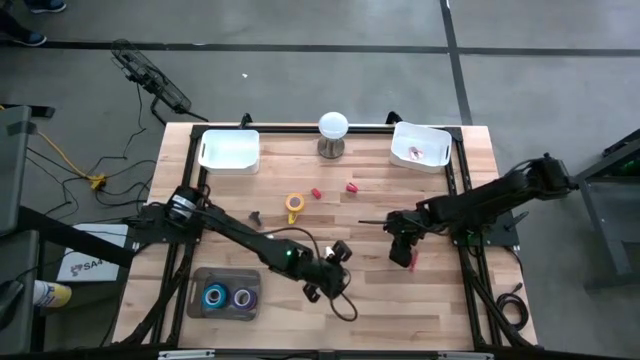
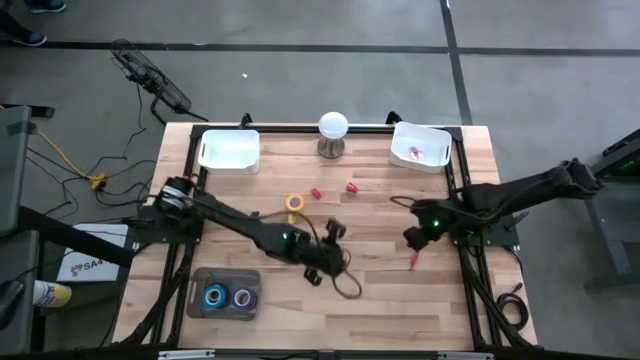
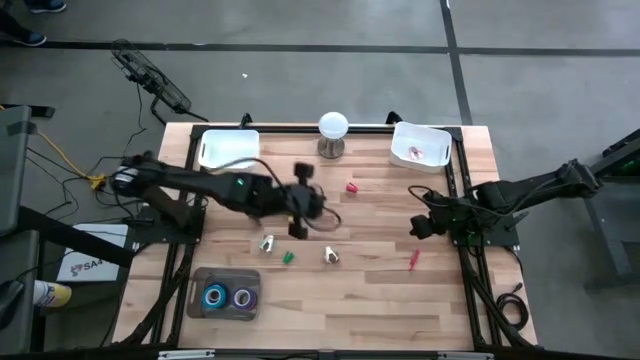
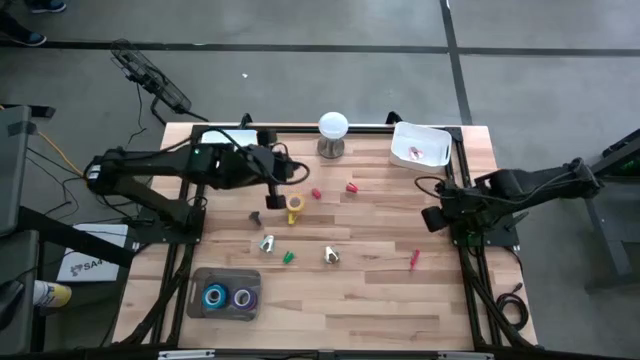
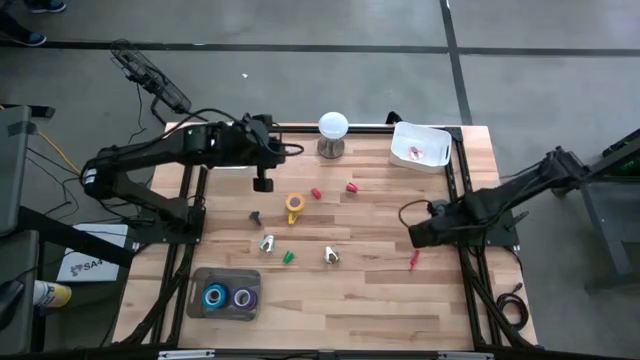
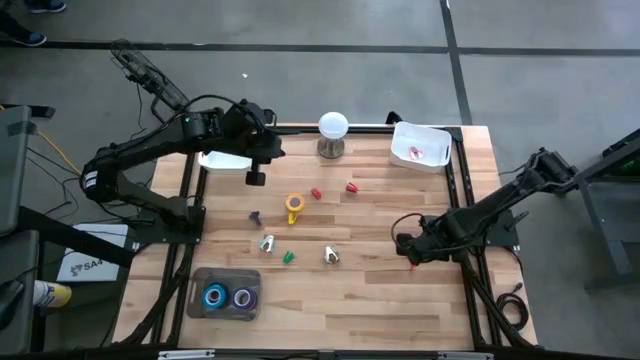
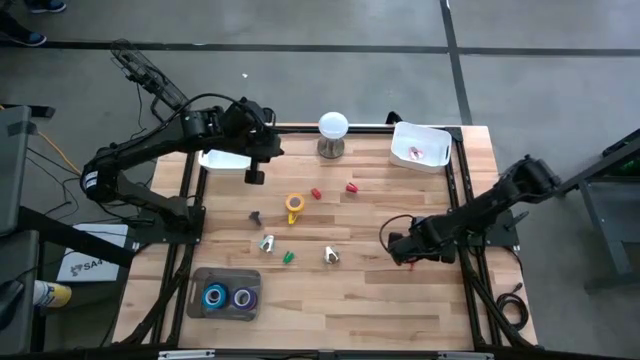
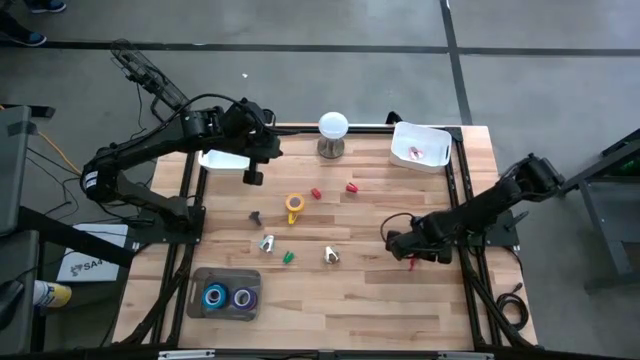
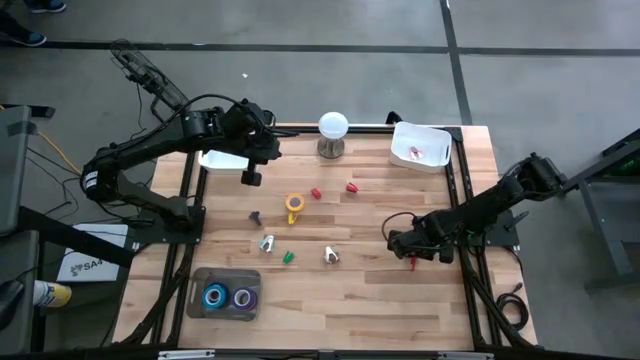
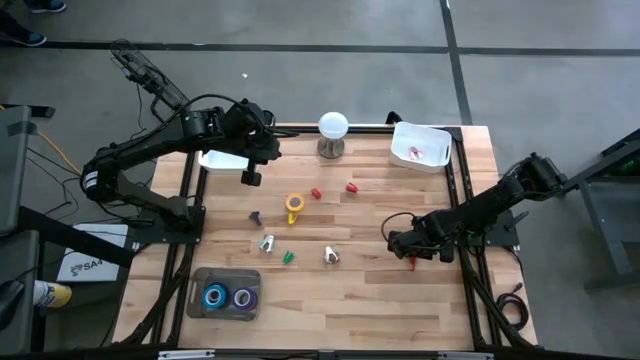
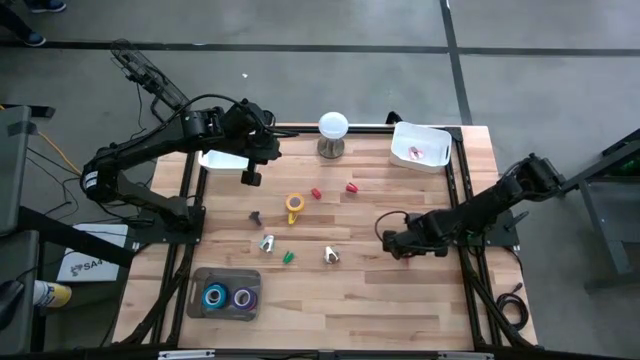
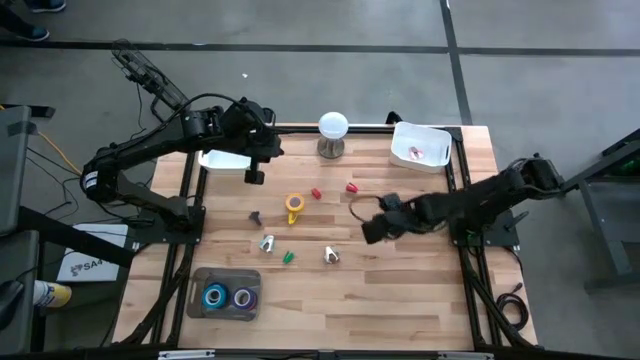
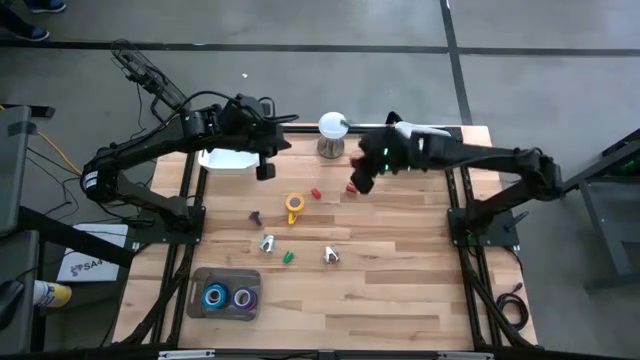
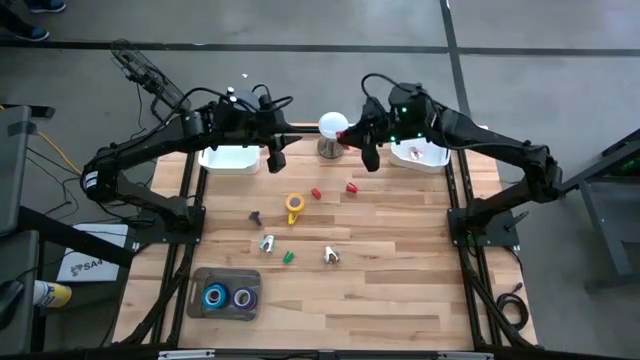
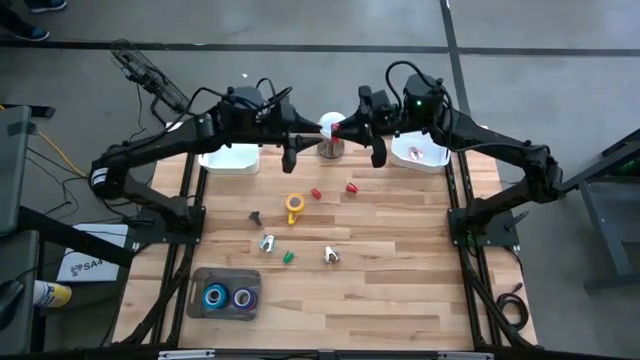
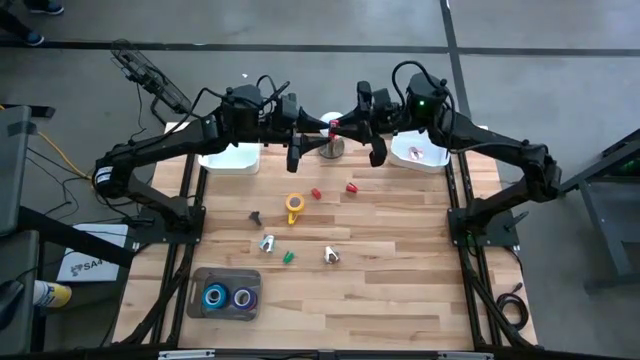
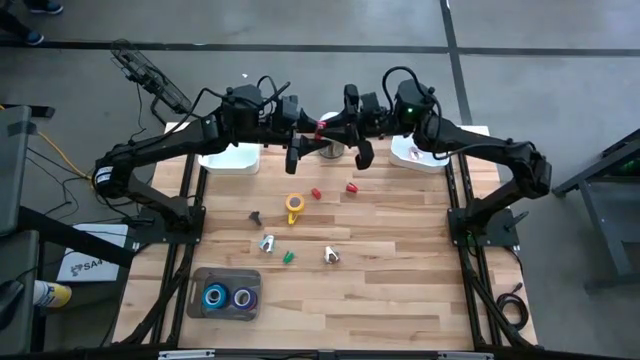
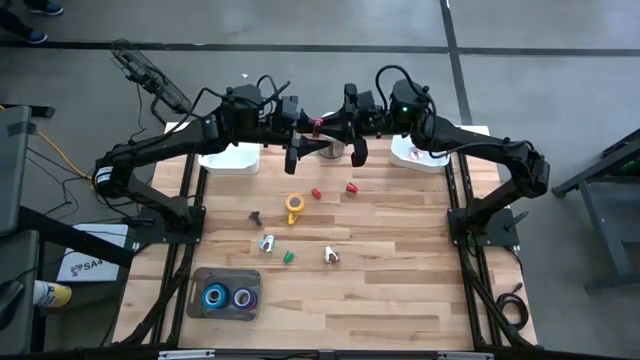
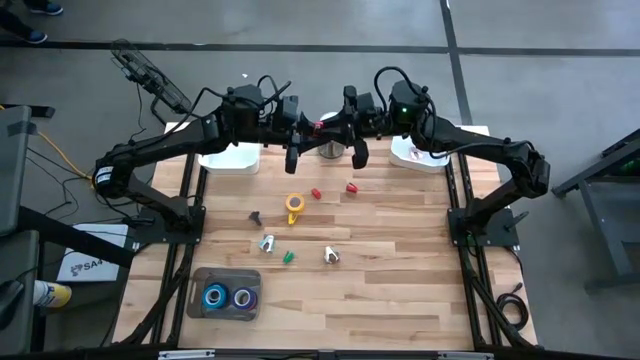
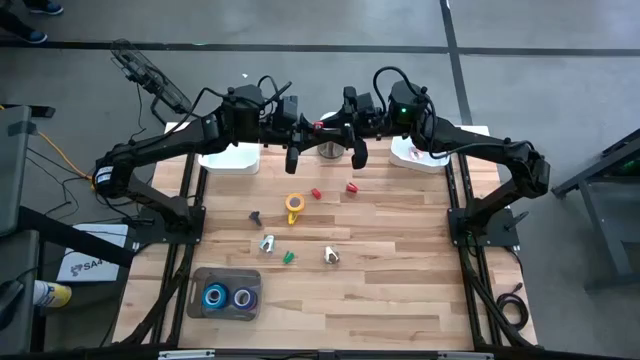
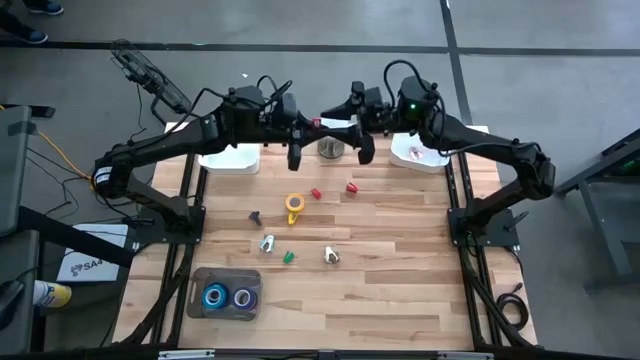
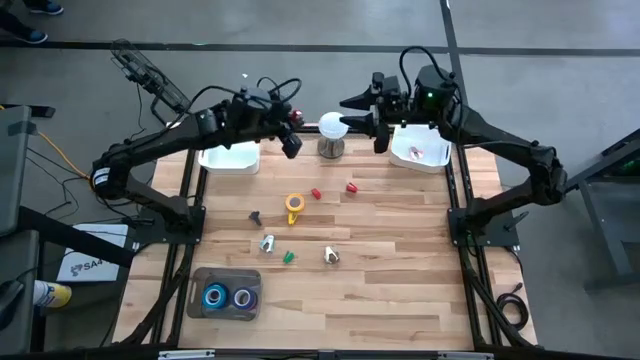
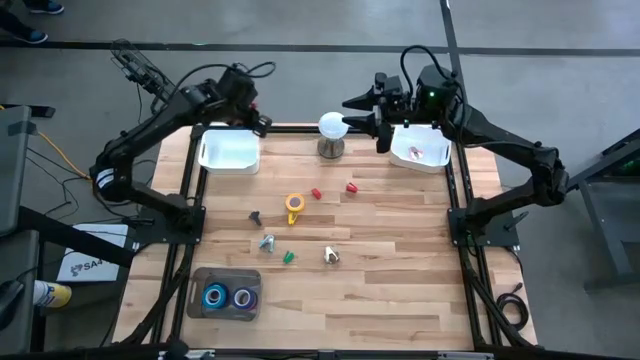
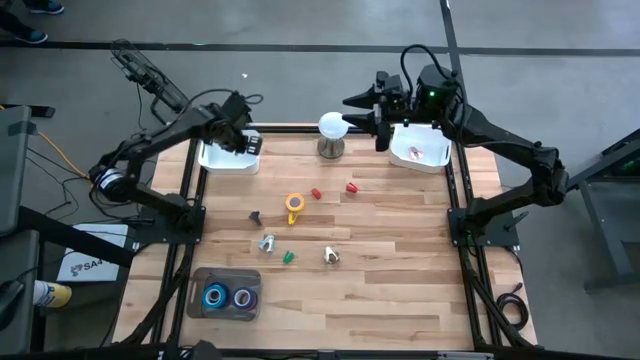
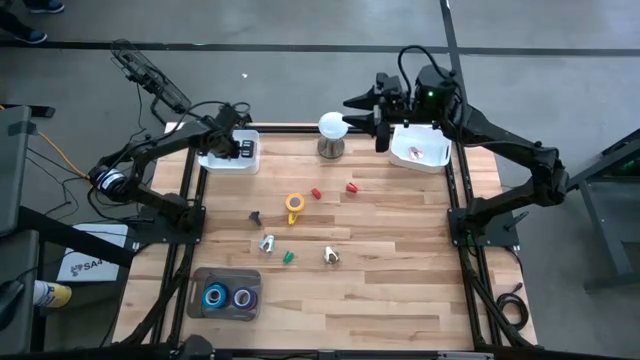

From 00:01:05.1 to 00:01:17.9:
Task: Pick and place Stapler, Stapler remover, tape
Put the bottom right red stapler into the left white bin

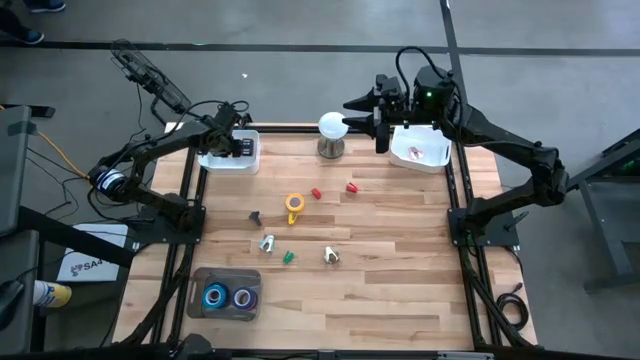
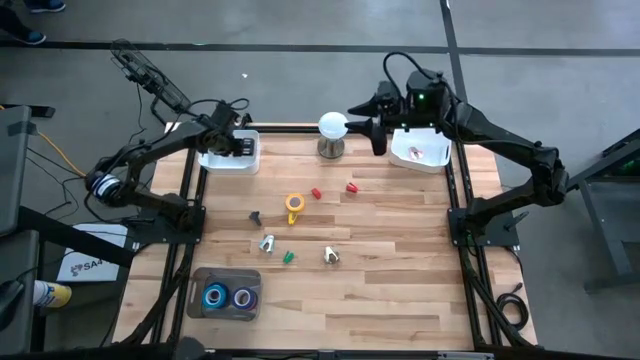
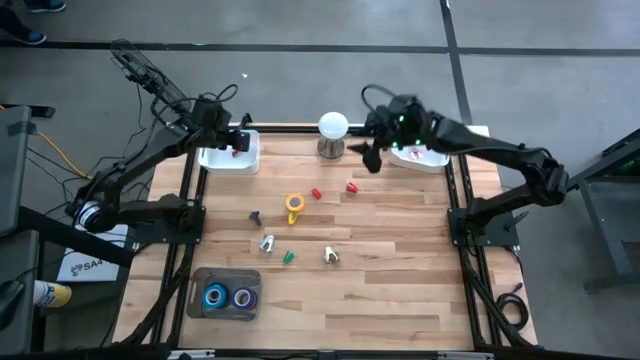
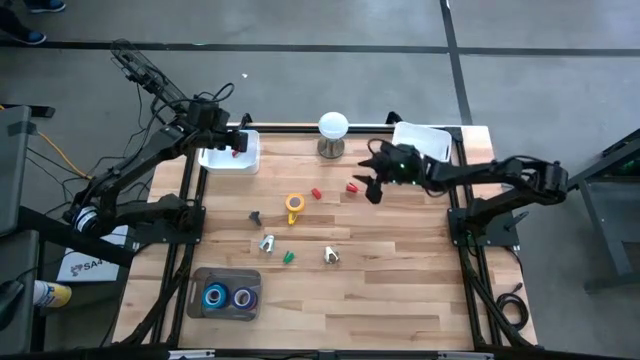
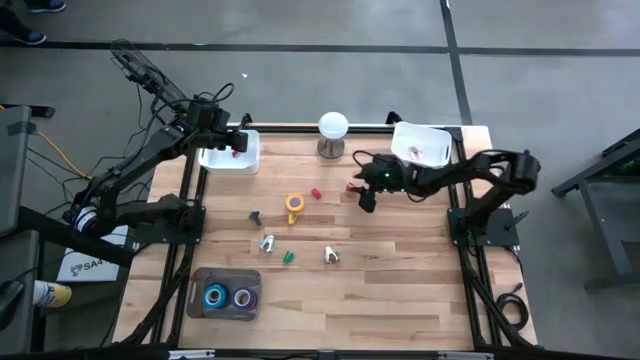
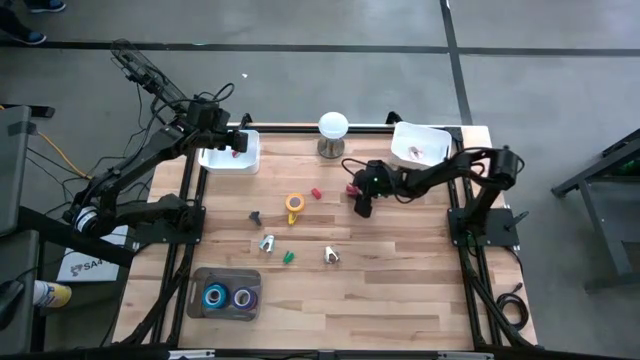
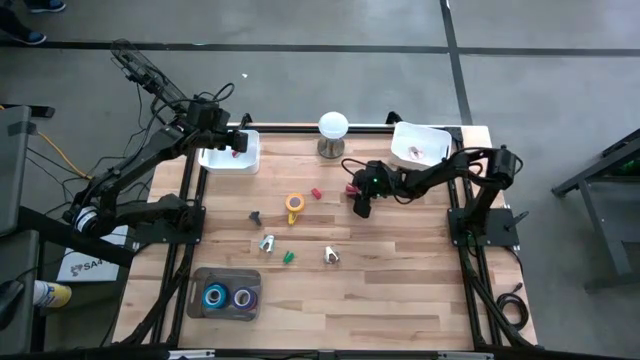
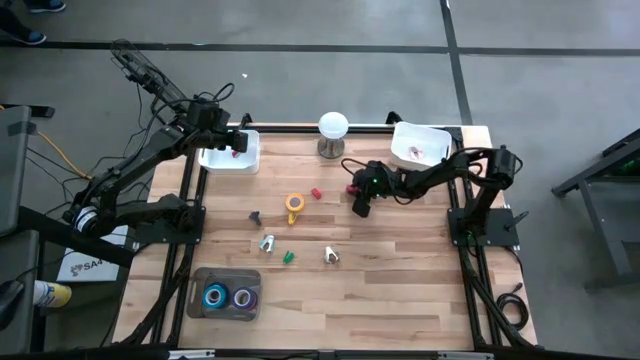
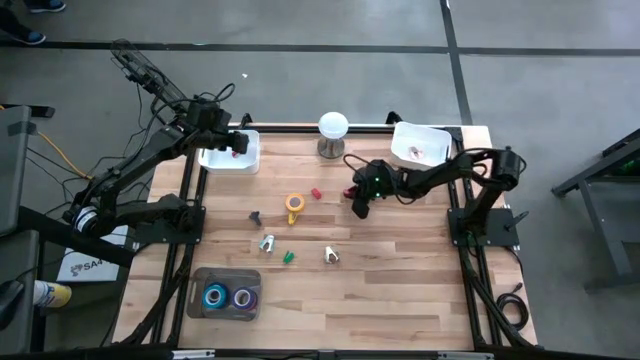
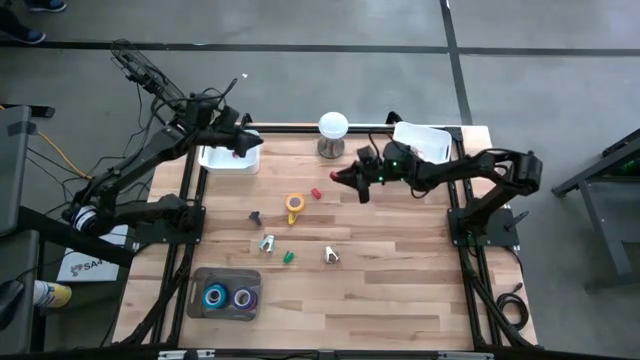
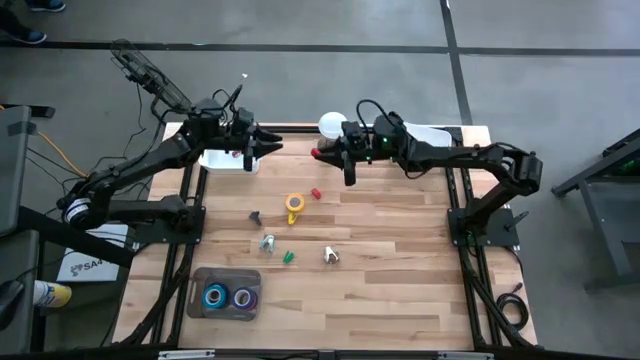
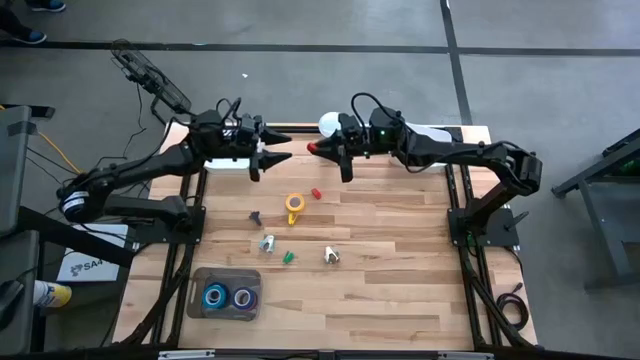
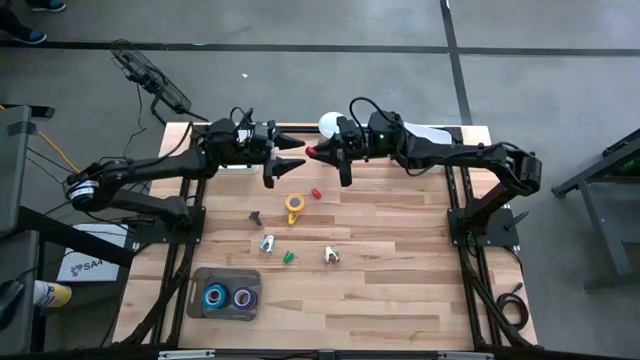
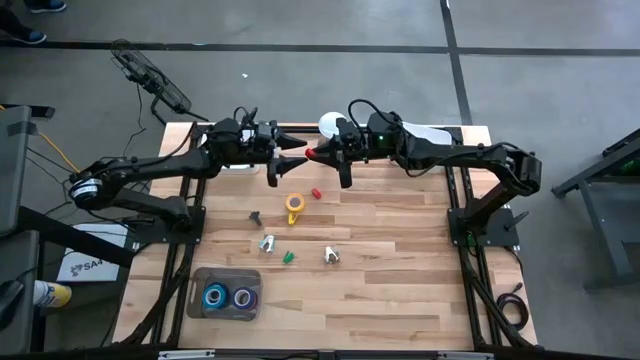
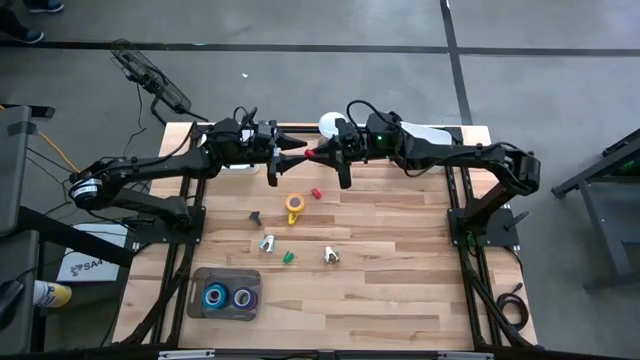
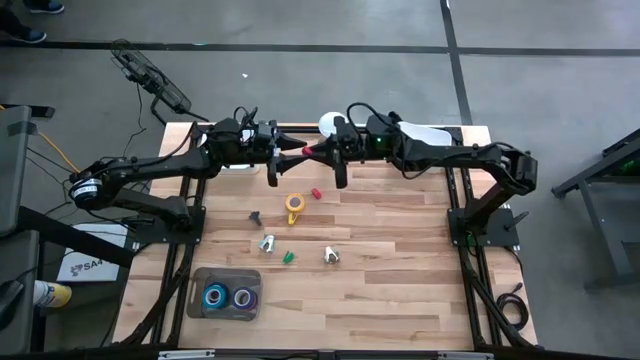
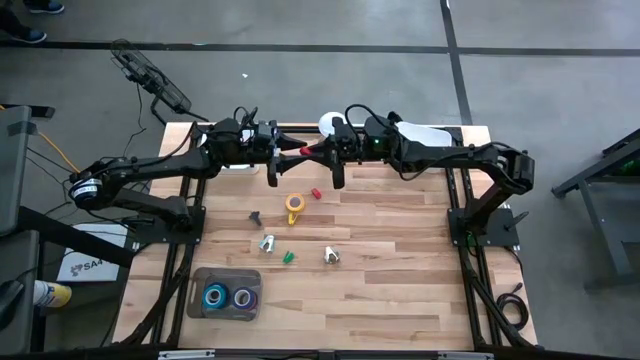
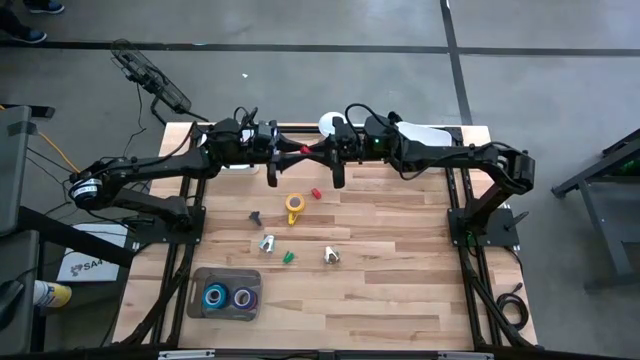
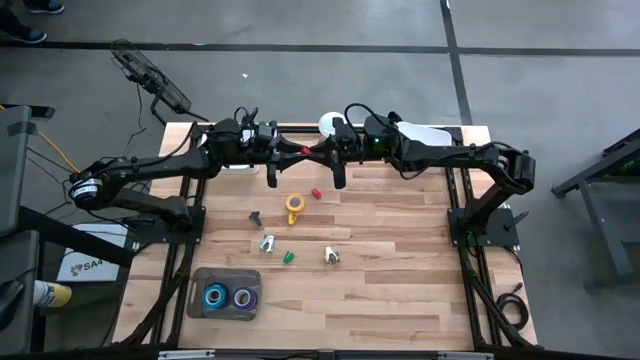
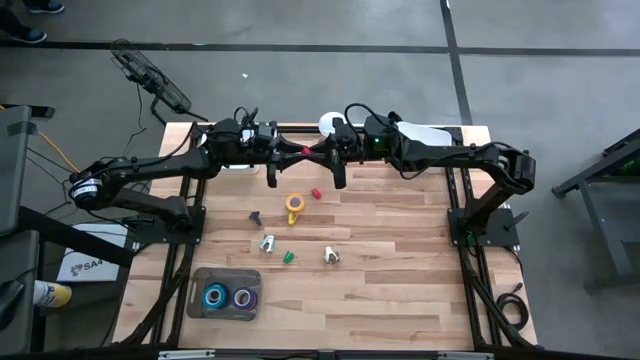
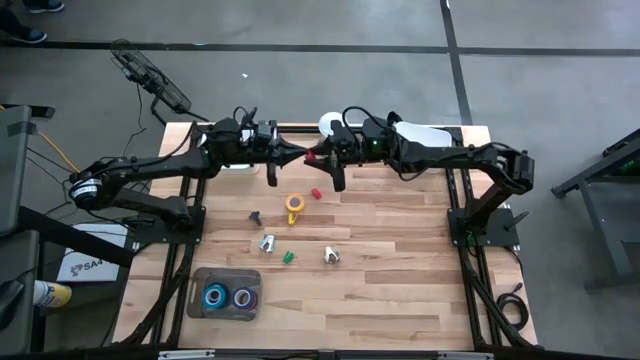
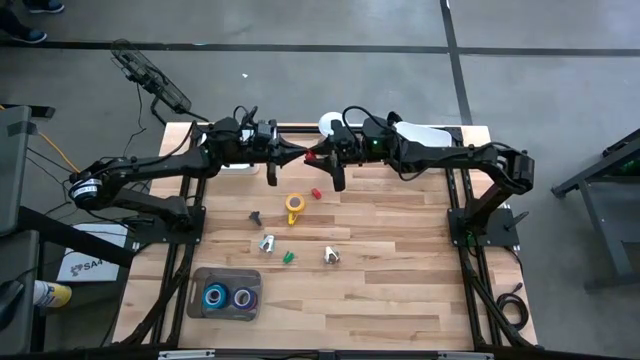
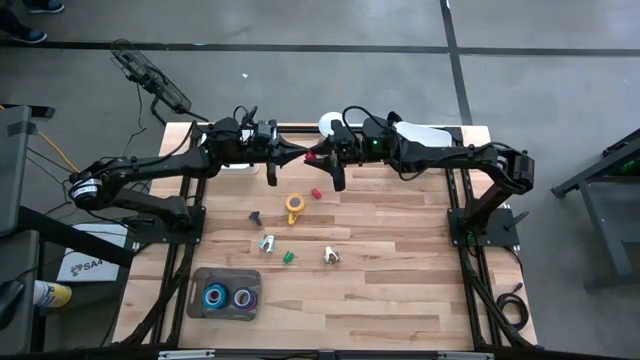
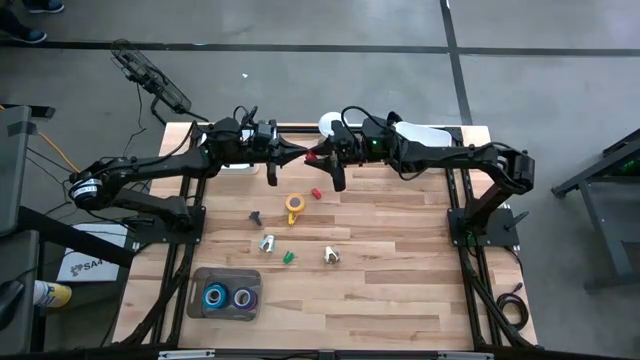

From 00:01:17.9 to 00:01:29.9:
Put the right red stapler into the left white bin
